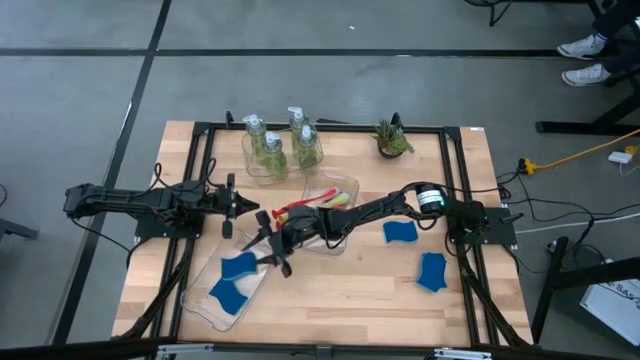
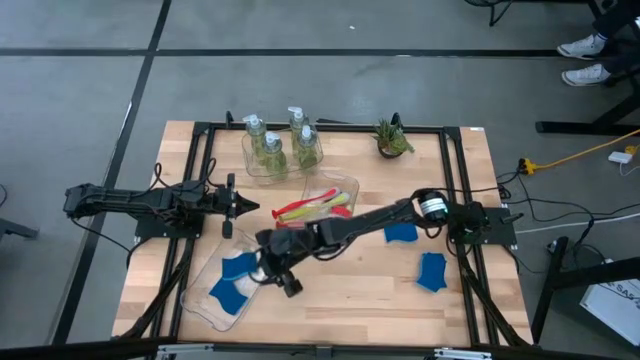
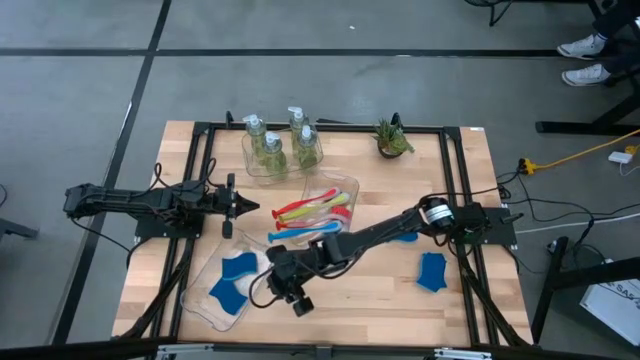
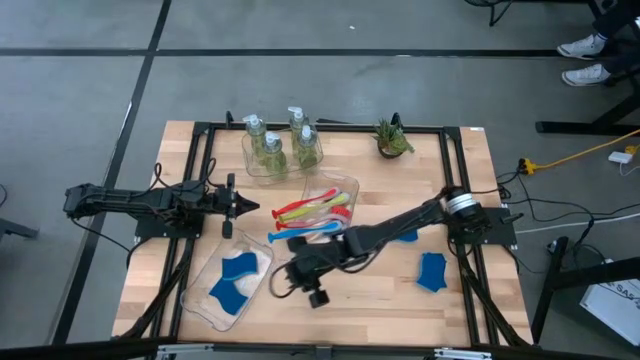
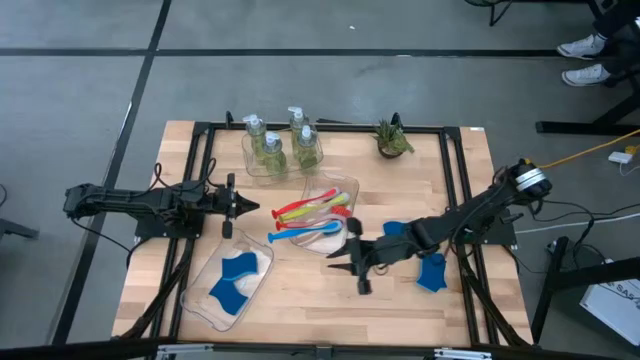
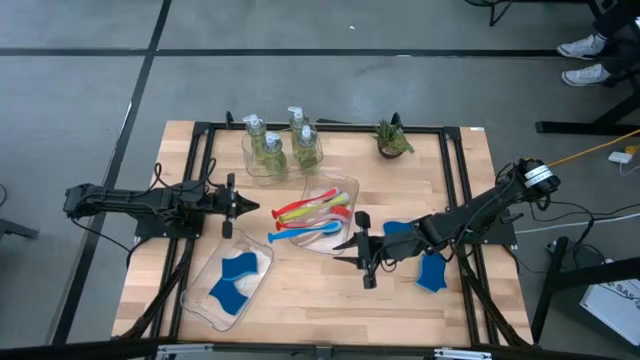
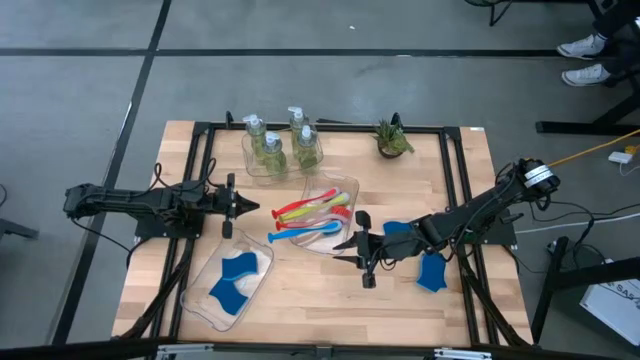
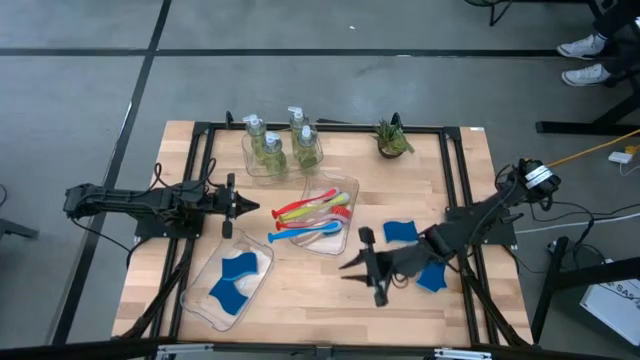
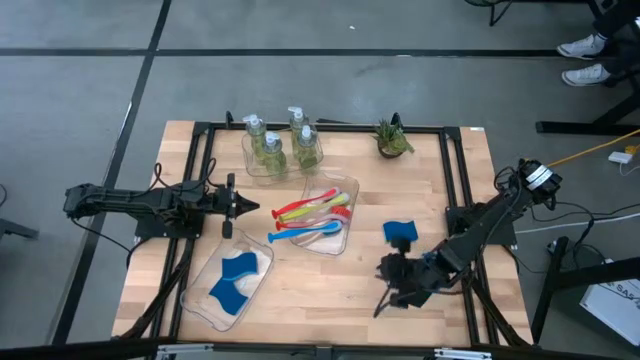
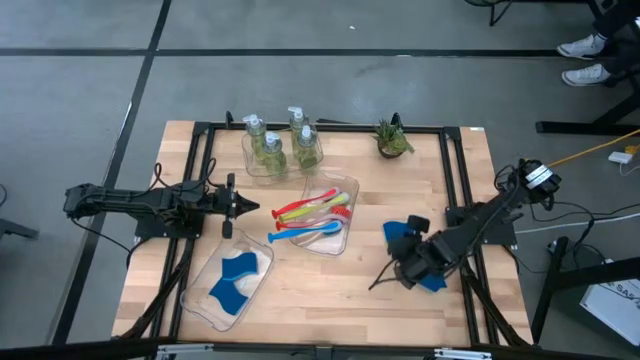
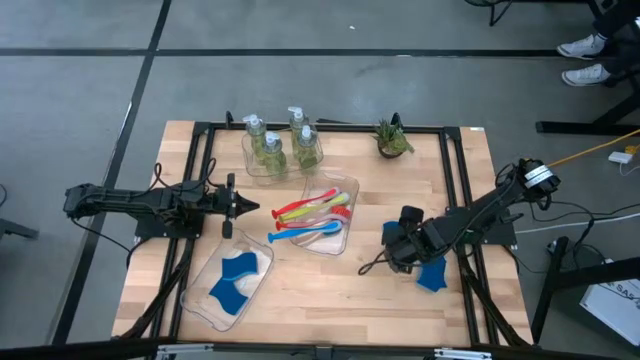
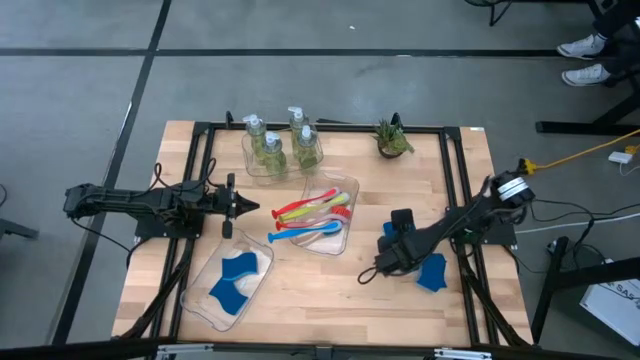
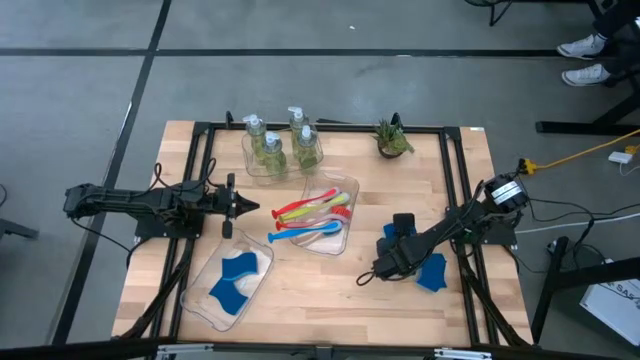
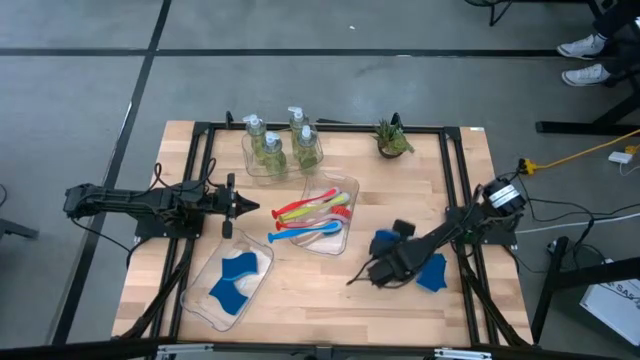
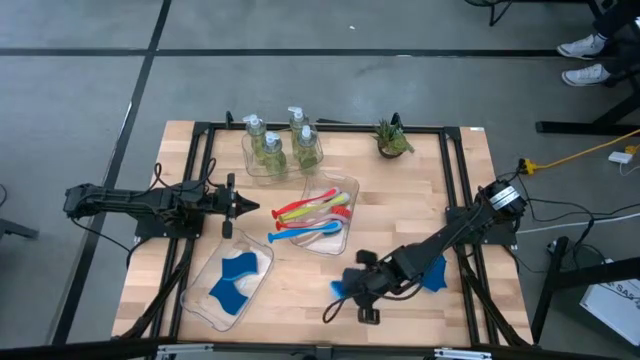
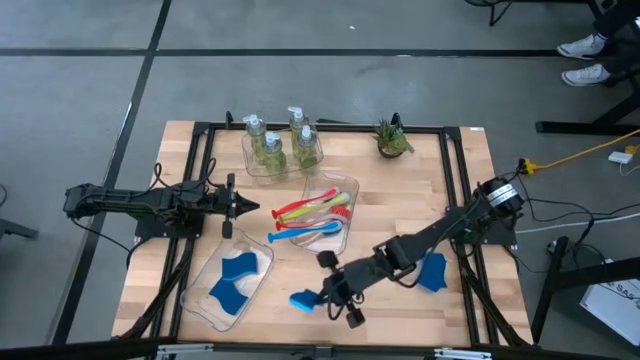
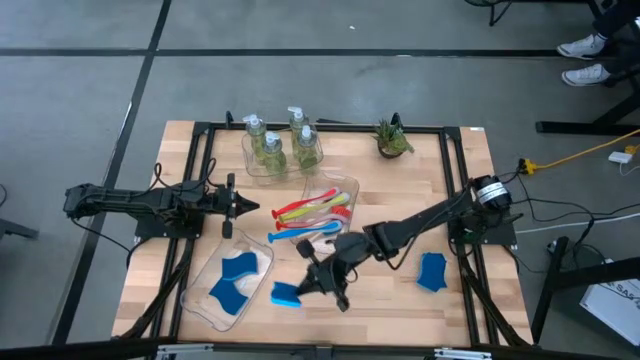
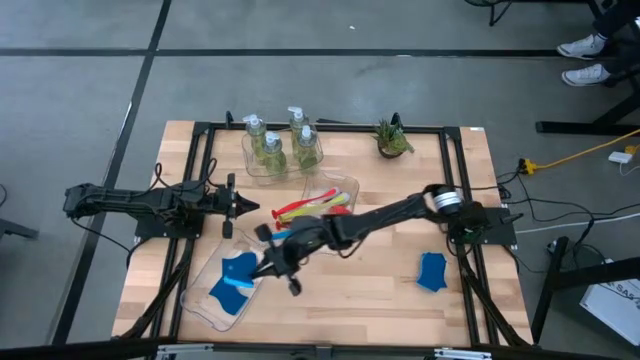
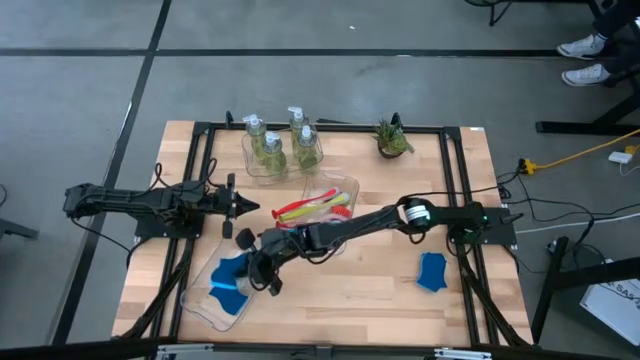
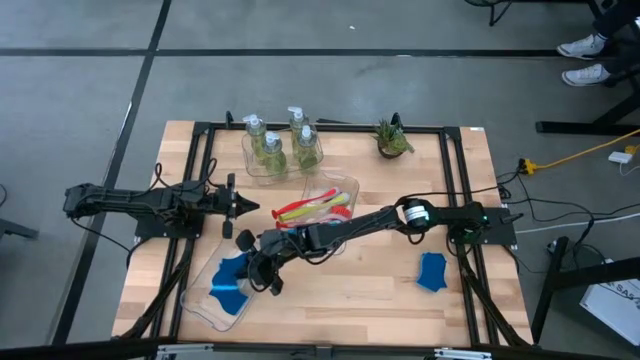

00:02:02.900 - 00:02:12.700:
Task: Pick & Place Kitchen Sink Supplies
Put the blue sponge into the bottom transparent bin

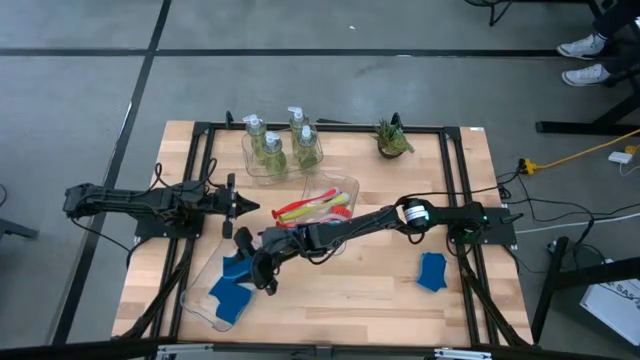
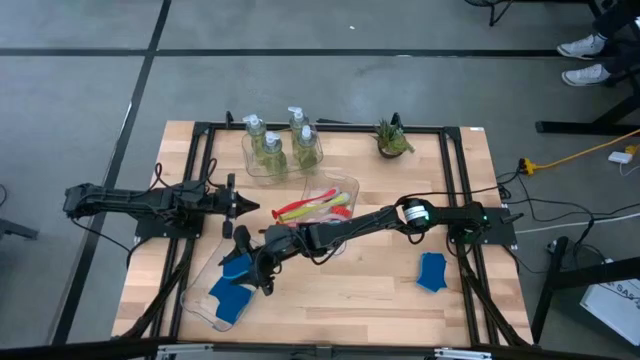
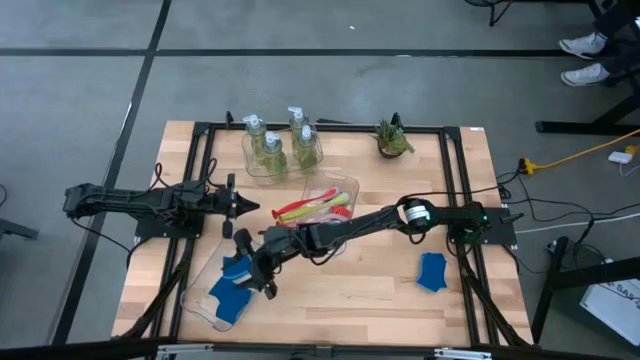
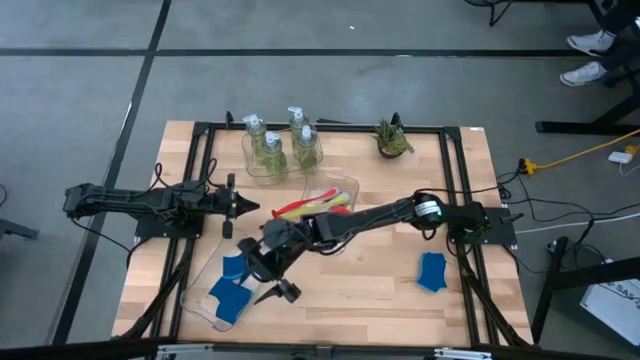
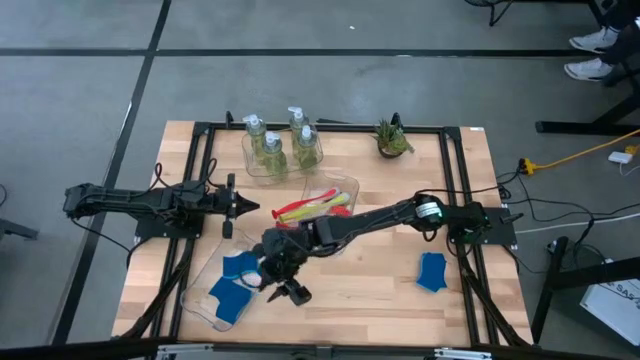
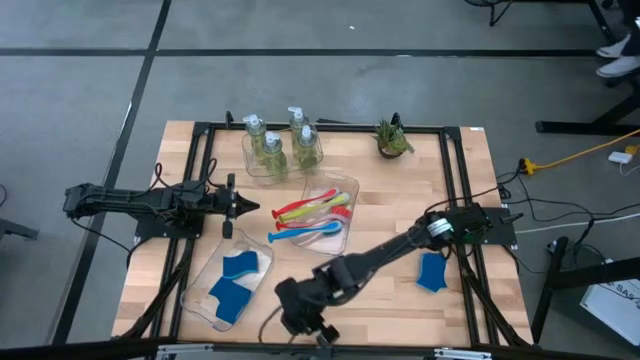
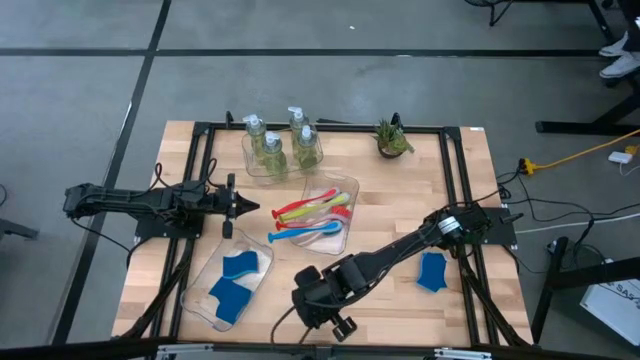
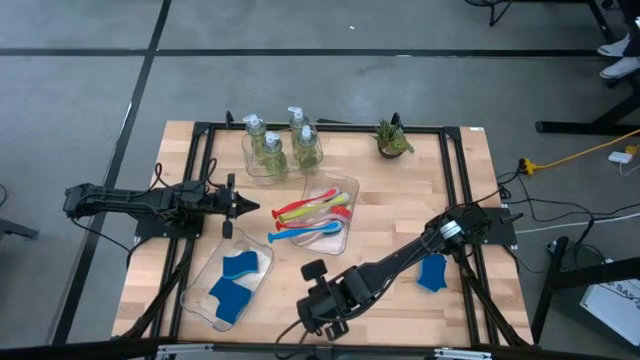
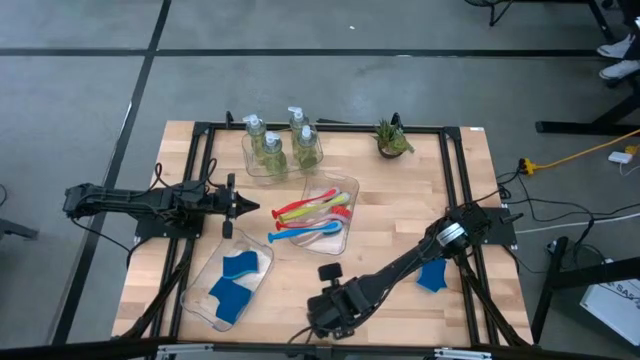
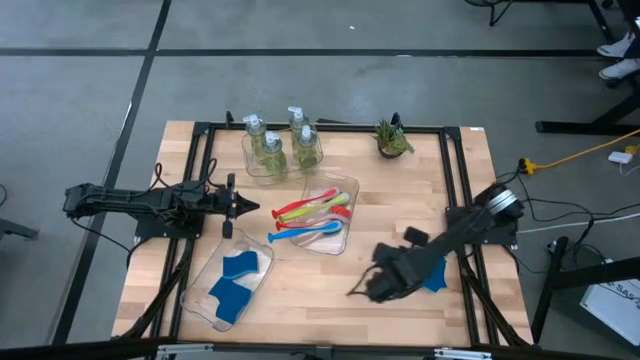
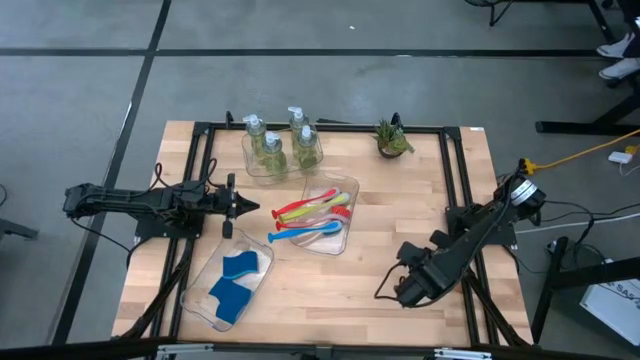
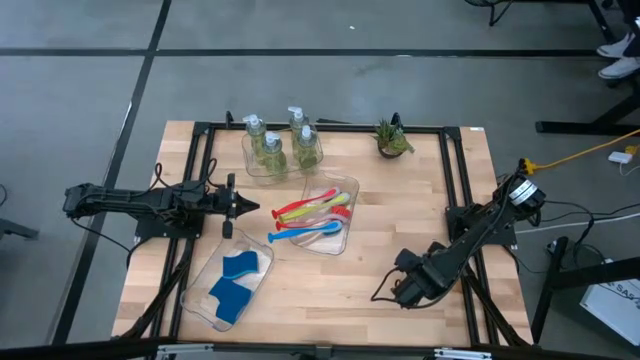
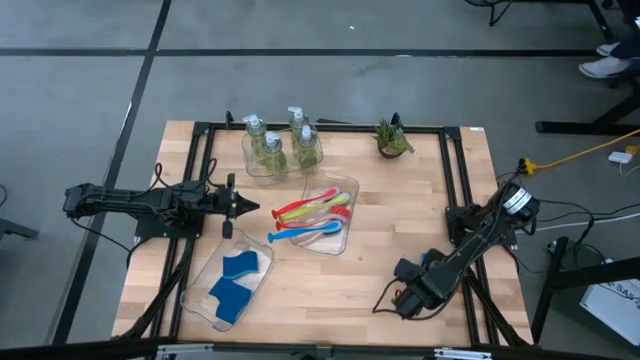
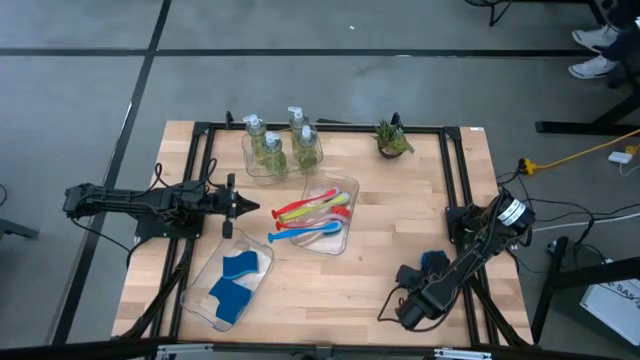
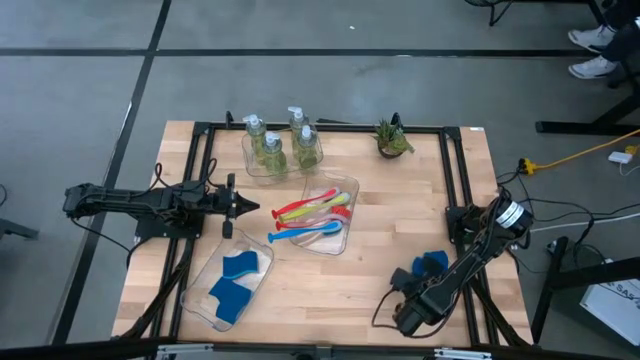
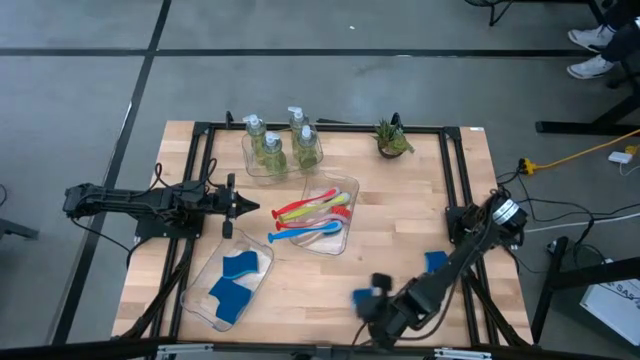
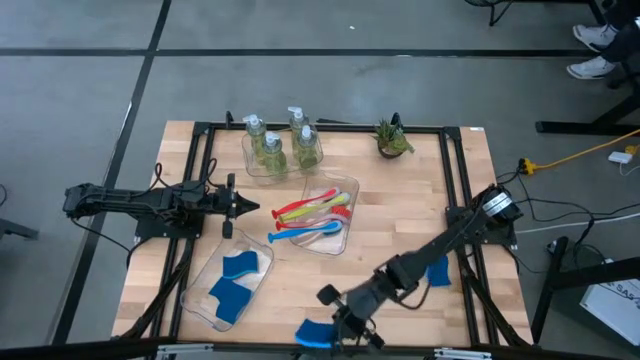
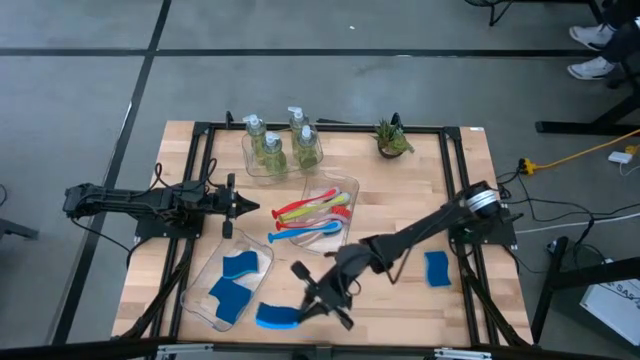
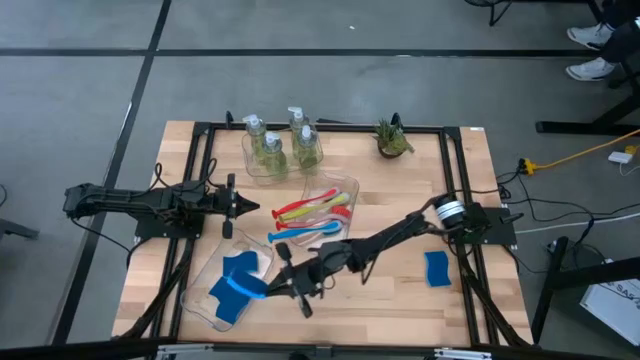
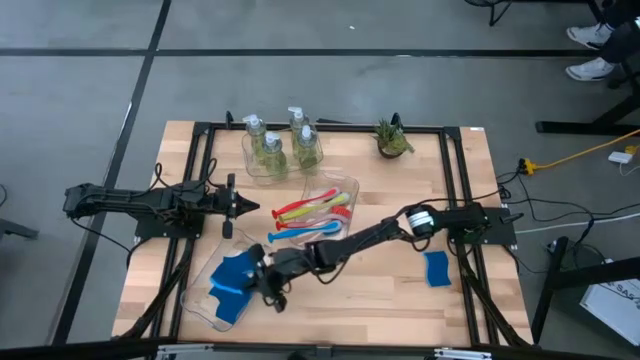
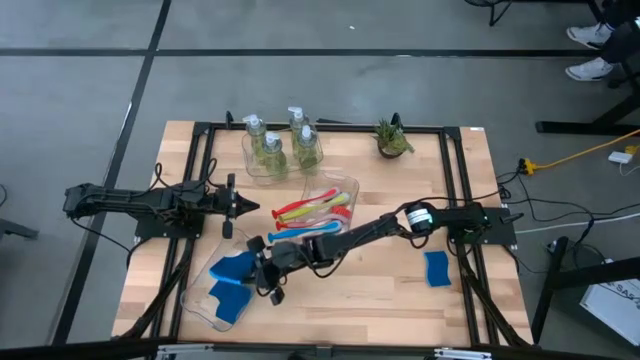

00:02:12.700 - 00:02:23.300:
Put the blue sponge into the bottom transparent bin

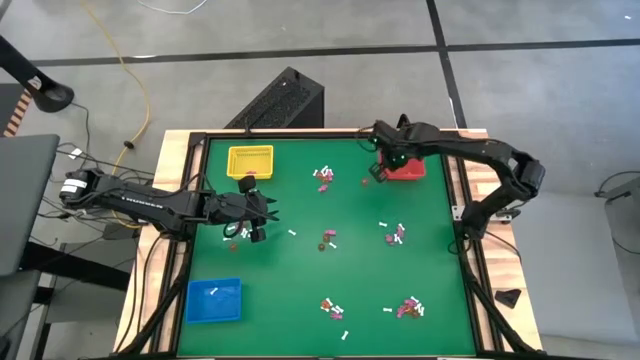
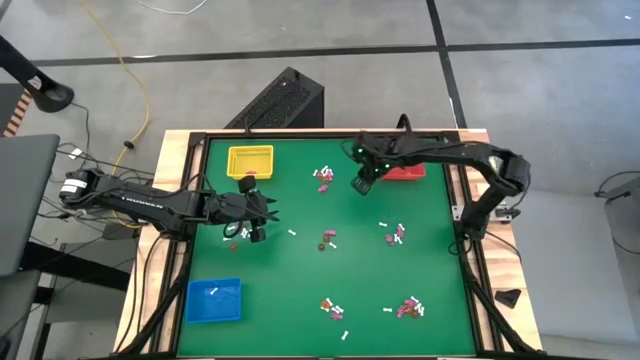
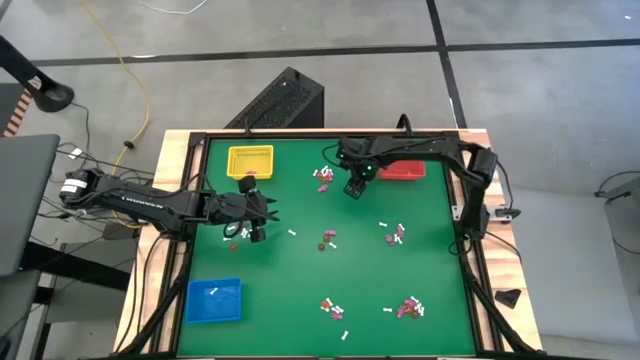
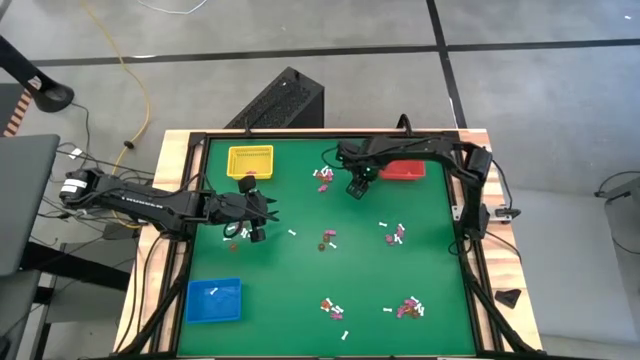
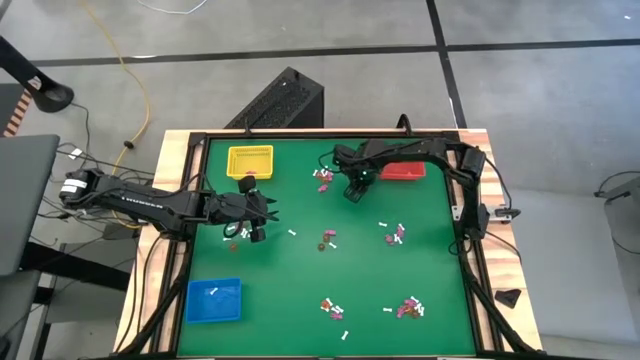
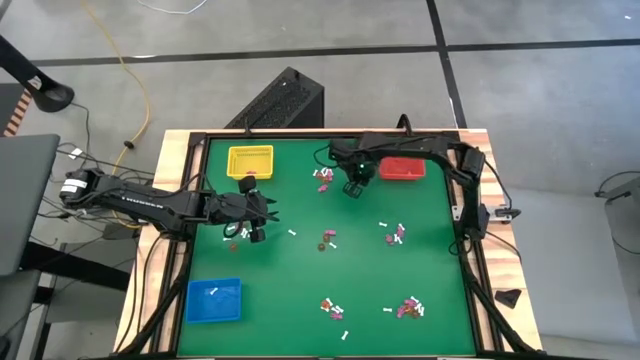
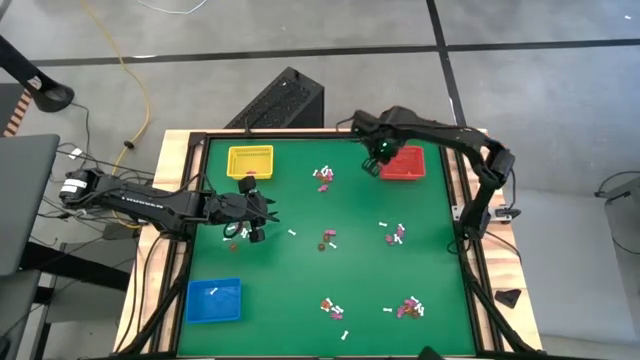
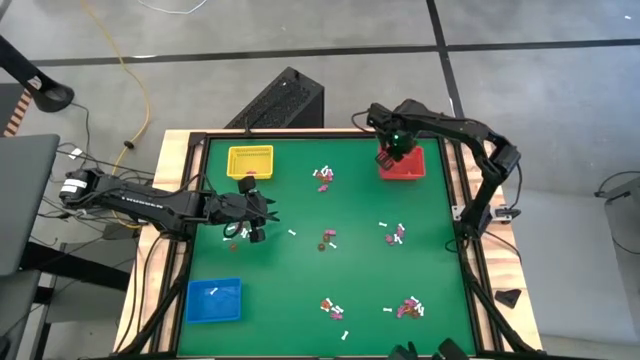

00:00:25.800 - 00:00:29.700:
Task: Sort Halloween decoration
Put the pumpkin toy into the orange bin
